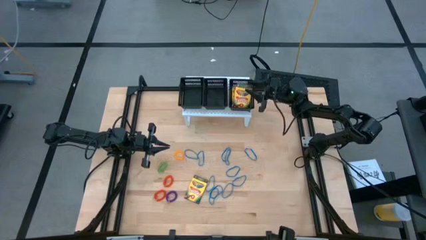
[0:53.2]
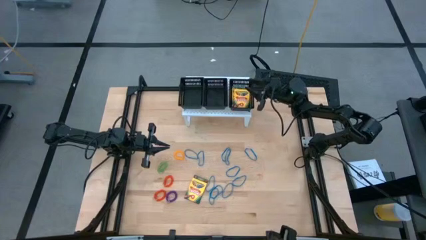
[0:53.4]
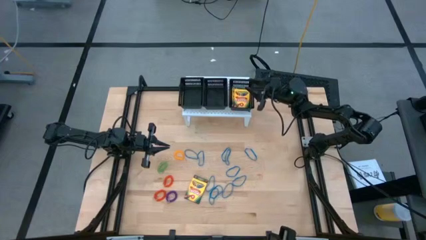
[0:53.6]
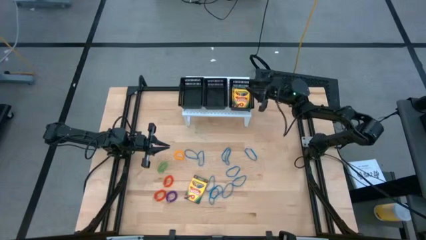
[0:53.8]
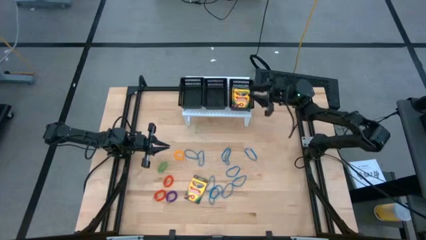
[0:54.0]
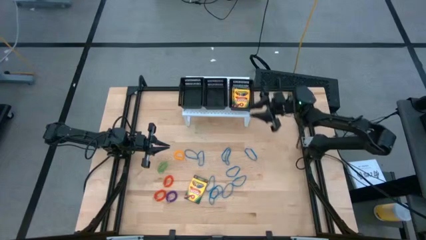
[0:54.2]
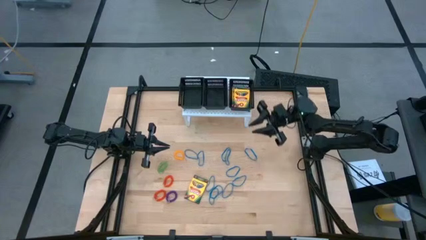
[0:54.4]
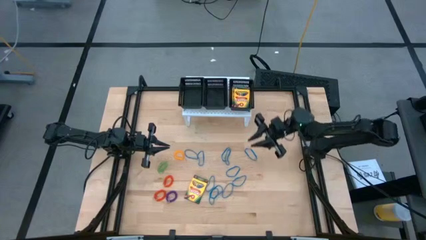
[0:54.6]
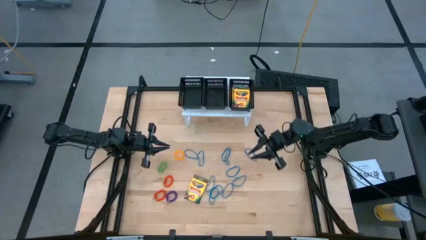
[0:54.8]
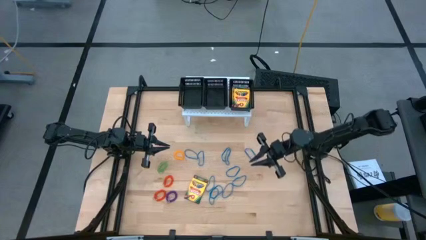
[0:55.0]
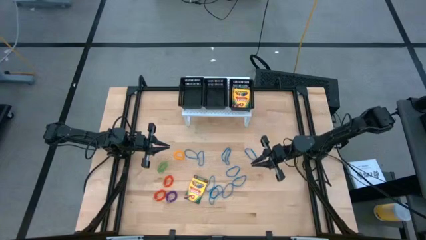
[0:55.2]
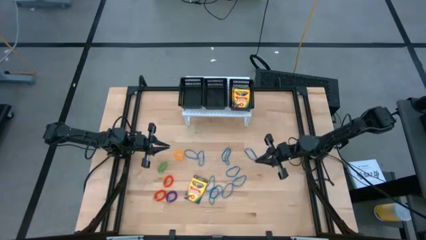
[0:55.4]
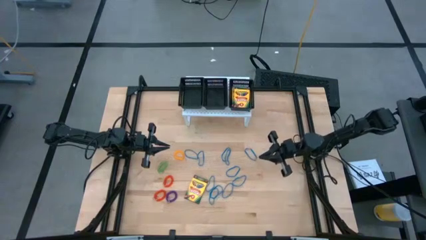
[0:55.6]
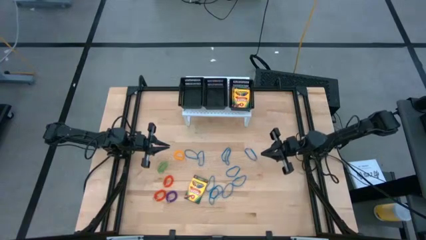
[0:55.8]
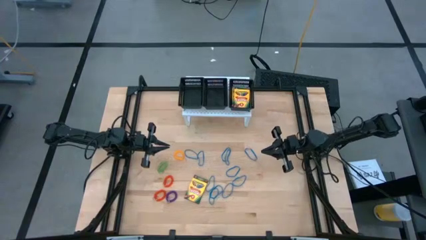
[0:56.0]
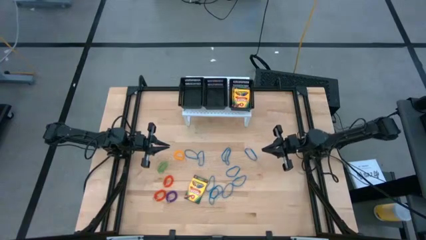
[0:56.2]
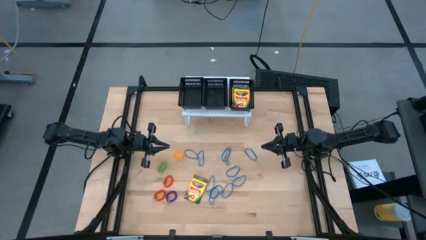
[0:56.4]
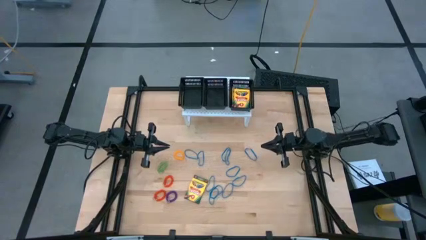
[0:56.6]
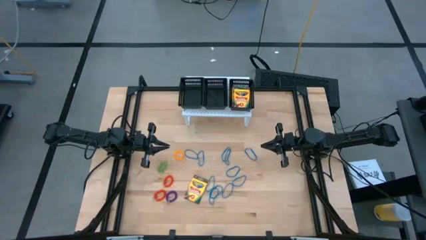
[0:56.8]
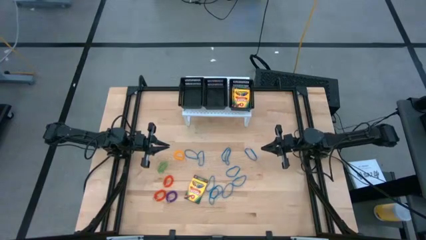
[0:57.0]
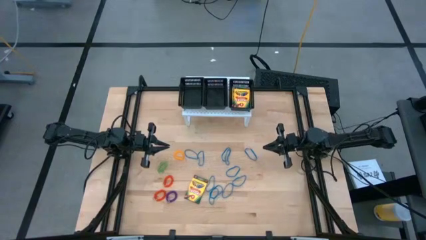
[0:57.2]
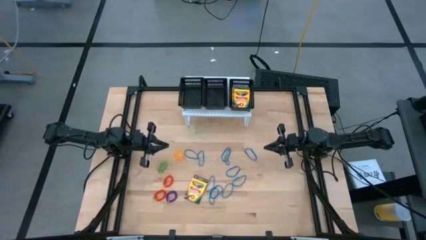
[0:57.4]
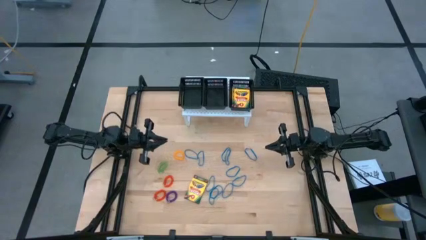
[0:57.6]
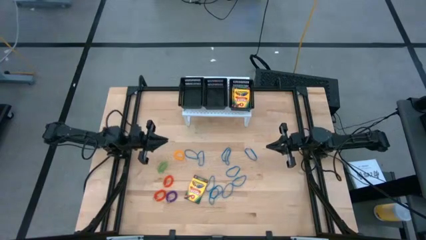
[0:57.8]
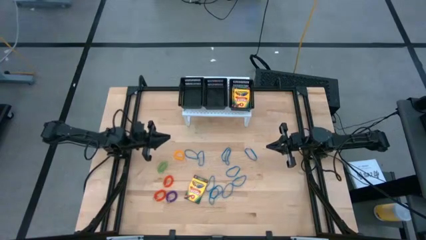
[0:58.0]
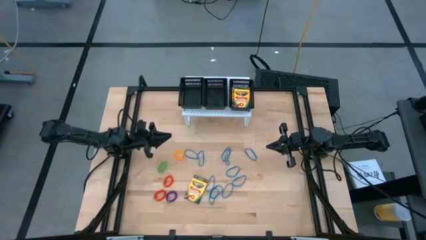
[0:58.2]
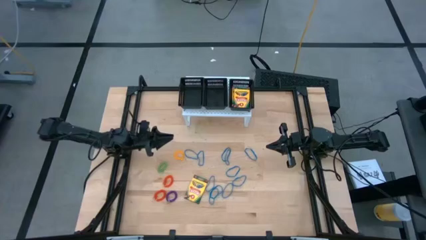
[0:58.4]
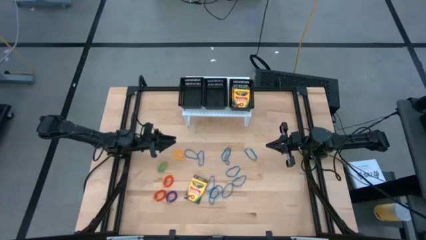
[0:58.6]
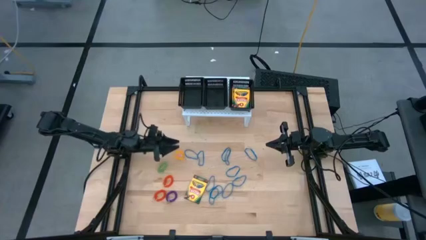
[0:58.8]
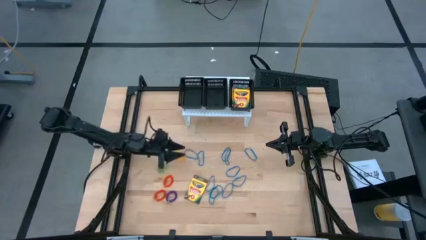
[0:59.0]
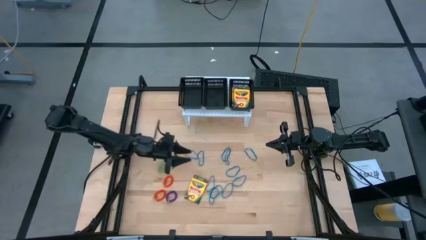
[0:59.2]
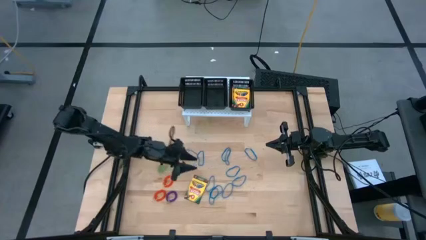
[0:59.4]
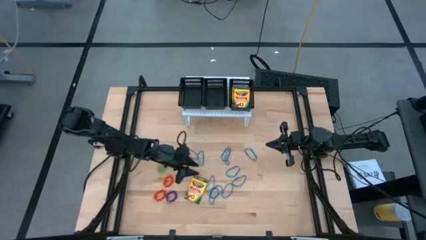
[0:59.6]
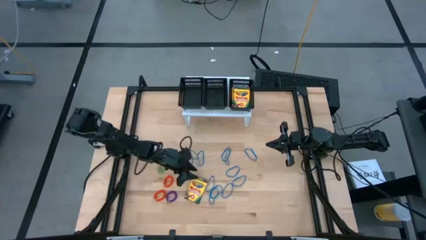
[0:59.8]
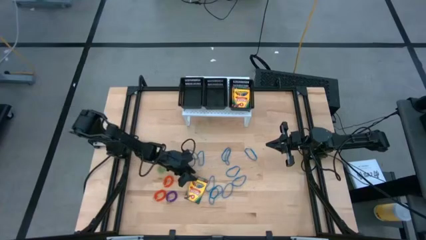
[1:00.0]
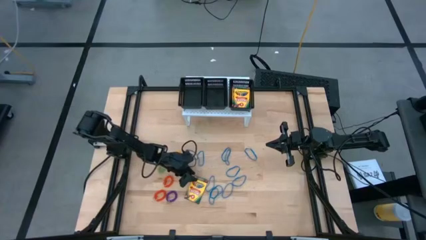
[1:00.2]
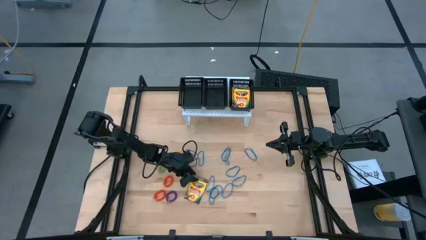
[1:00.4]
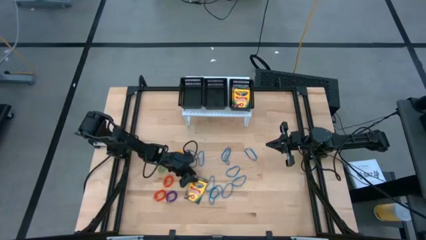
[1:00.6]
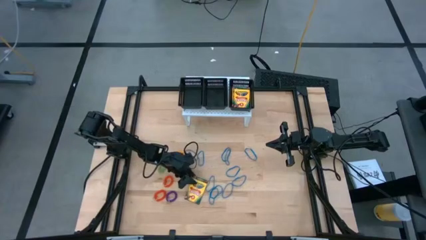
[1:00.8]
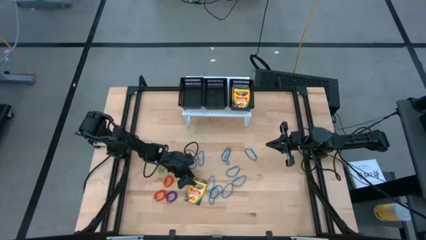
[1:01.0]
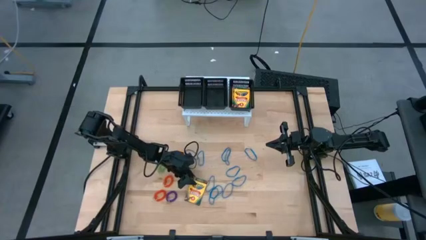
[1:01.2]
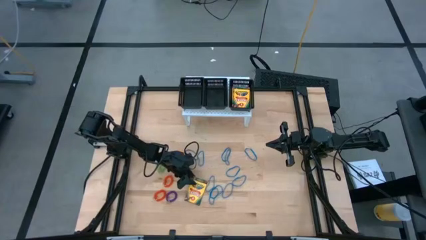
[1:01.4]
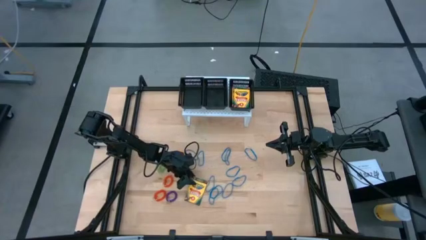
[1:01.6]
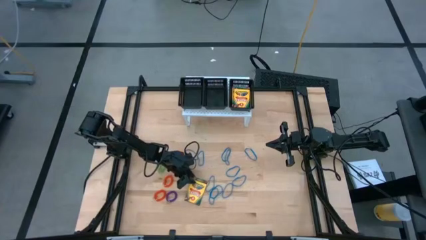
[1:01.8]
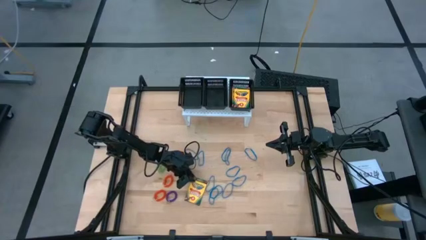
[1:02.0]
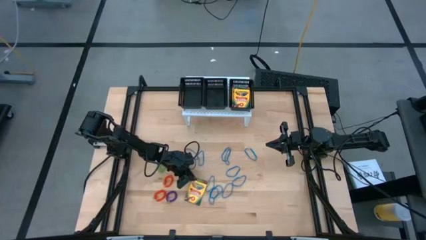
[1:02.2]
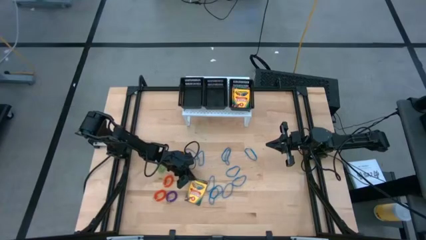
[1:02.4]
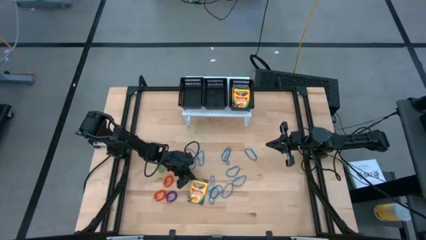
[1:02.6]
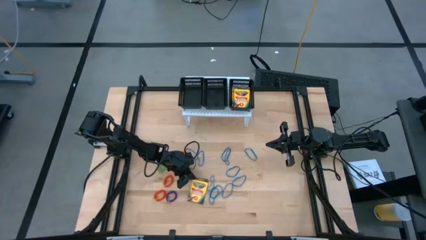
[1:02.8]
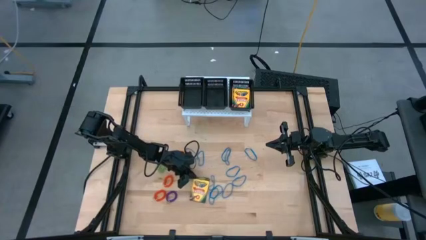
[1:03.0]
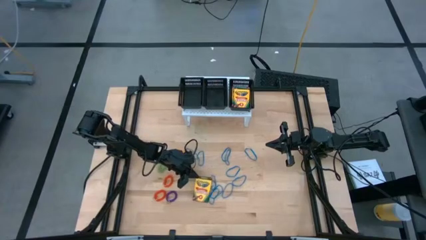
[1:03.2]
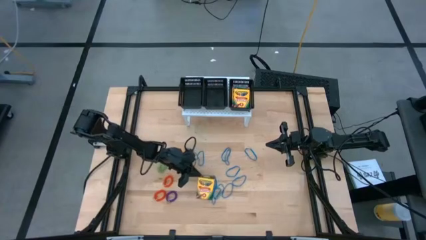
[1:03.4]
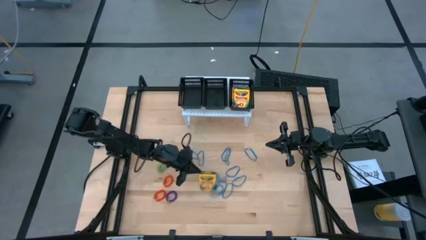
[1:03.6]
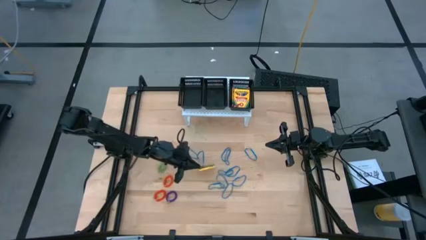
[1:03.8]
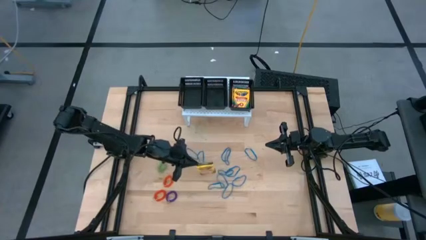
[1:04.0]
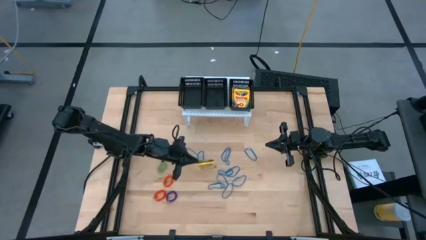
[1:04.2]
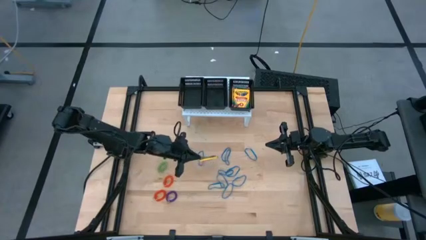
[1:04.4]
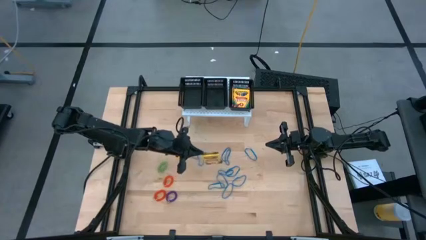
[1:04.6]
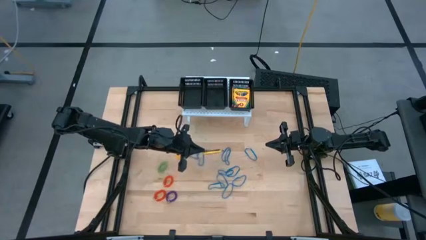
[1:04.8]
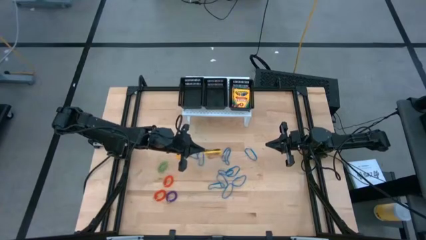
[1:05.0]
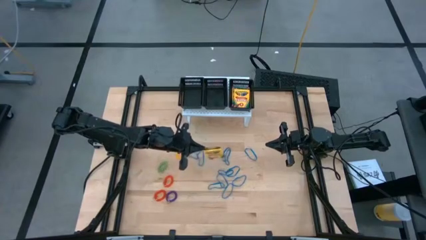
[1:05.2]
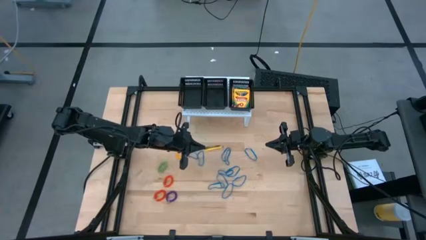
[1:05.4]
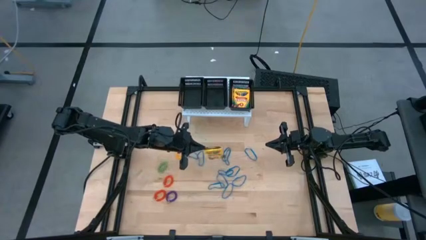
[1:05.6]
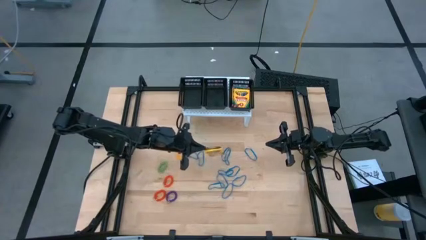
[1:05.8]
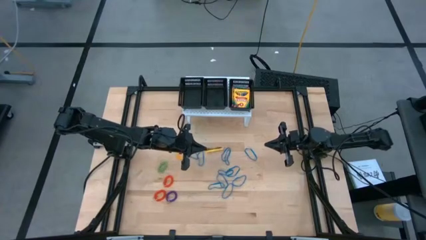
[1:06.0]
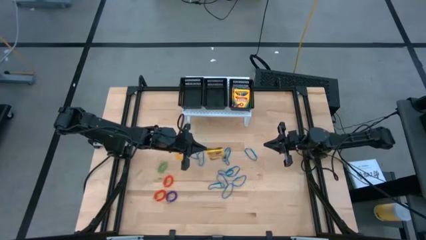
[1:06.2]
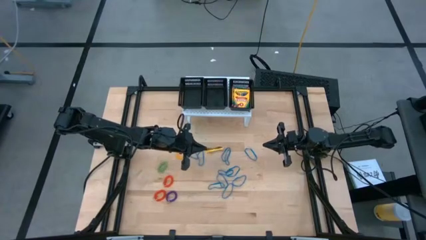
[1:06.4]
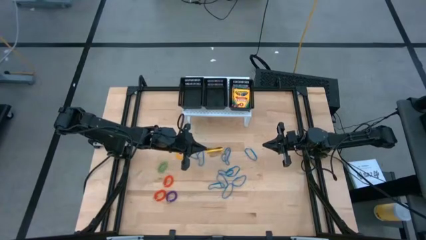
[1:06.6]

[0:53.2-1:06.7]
Task: Pick & Place Office Desk Supplies
Put the crayon box into the right black bin
